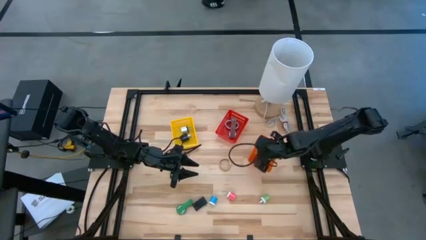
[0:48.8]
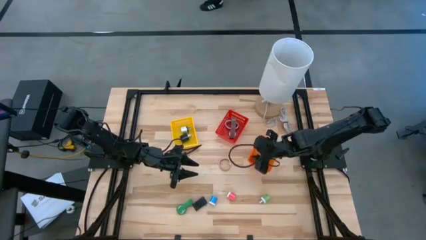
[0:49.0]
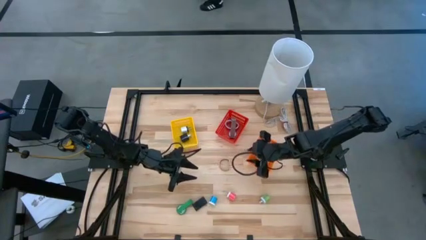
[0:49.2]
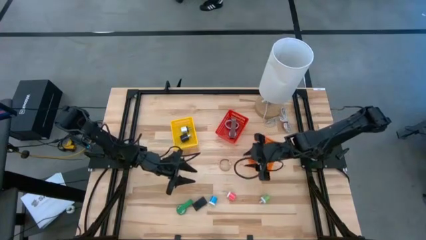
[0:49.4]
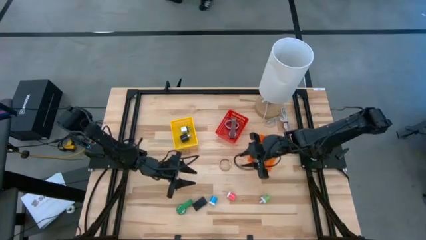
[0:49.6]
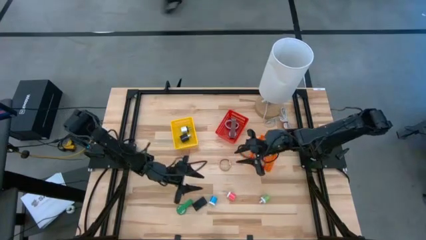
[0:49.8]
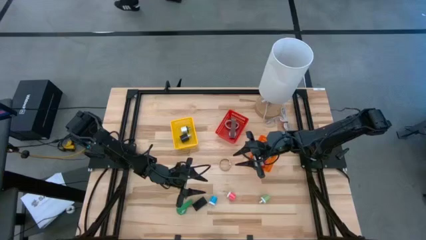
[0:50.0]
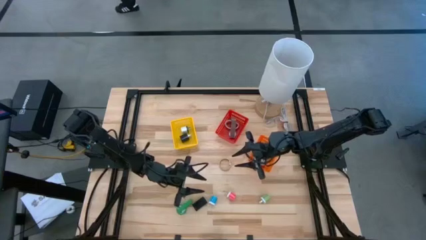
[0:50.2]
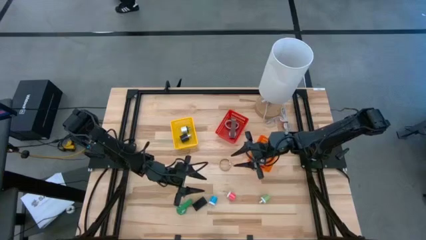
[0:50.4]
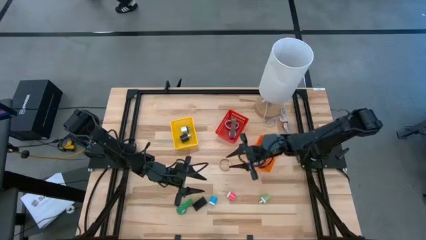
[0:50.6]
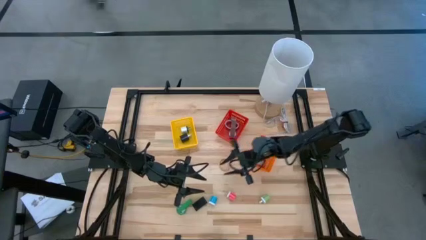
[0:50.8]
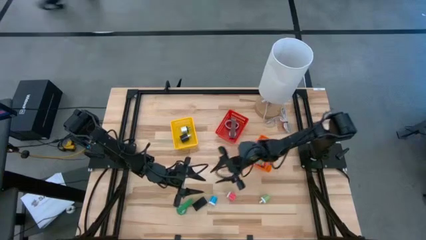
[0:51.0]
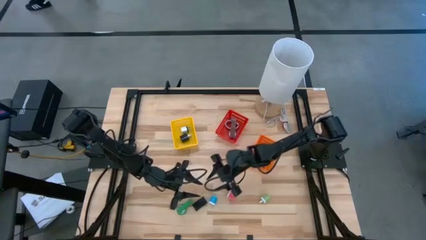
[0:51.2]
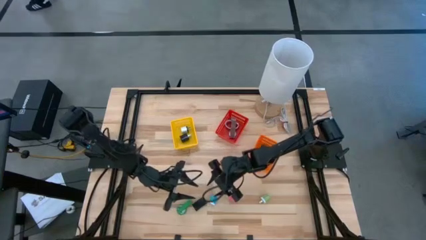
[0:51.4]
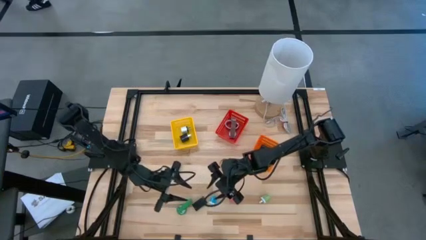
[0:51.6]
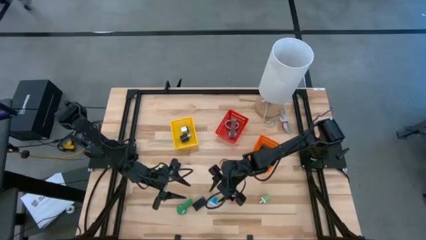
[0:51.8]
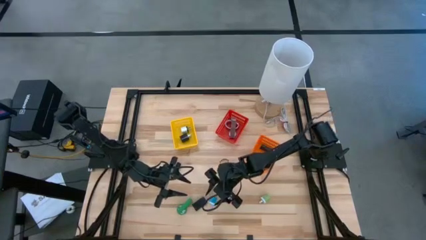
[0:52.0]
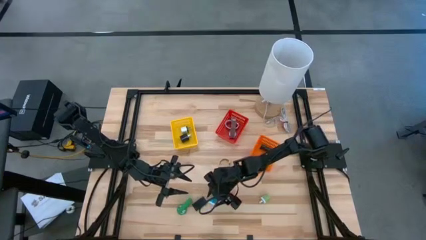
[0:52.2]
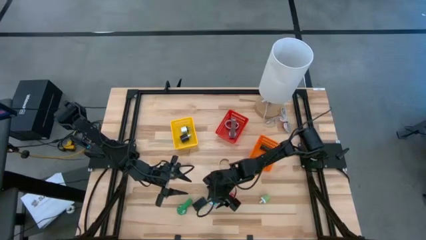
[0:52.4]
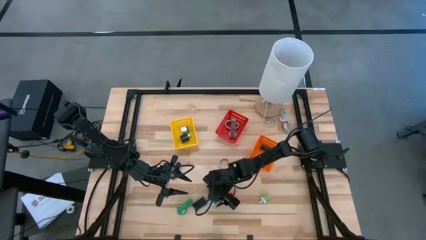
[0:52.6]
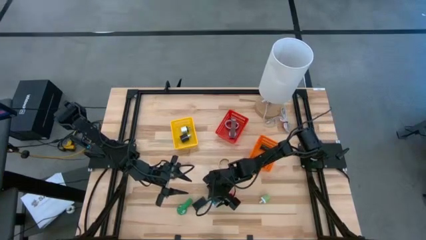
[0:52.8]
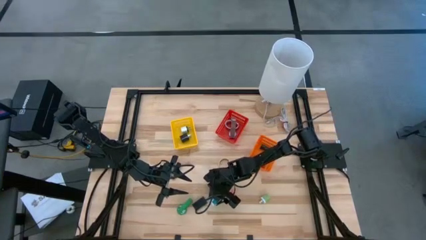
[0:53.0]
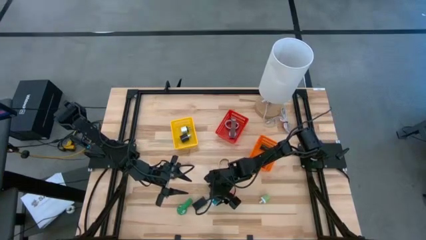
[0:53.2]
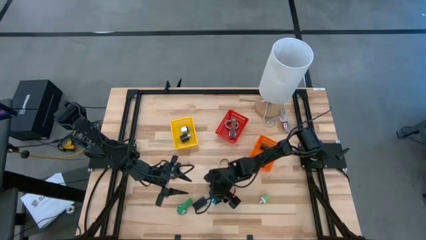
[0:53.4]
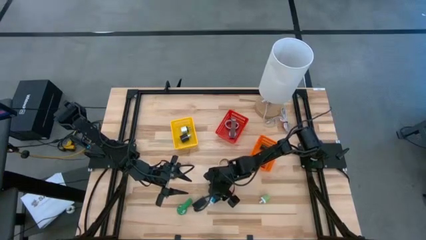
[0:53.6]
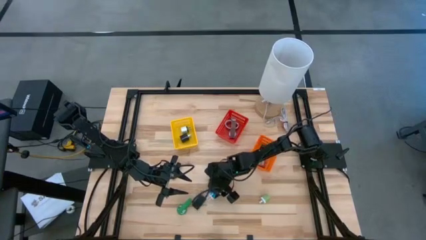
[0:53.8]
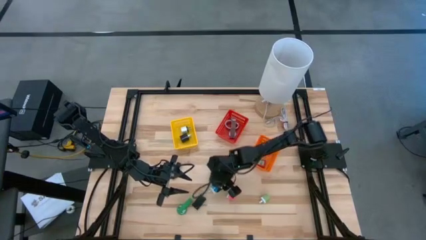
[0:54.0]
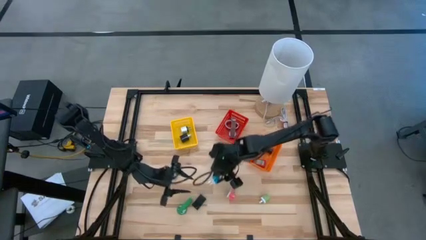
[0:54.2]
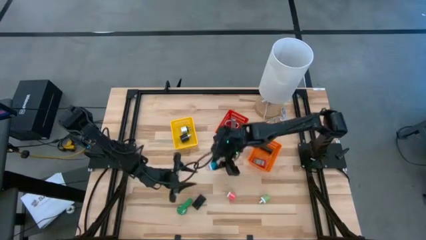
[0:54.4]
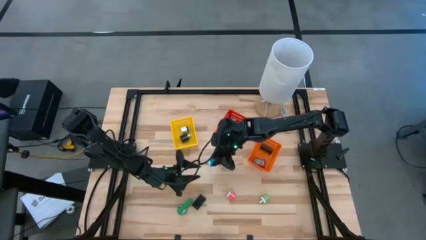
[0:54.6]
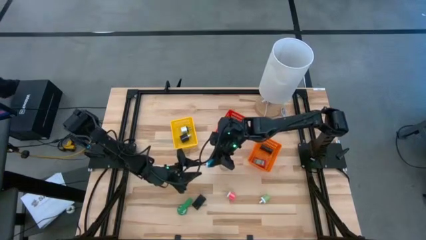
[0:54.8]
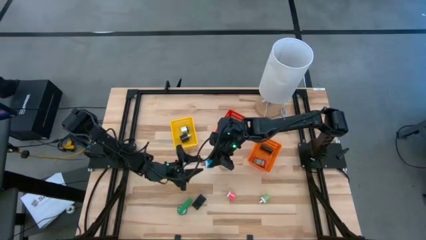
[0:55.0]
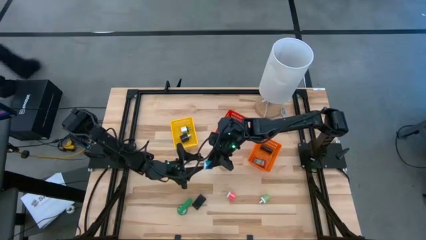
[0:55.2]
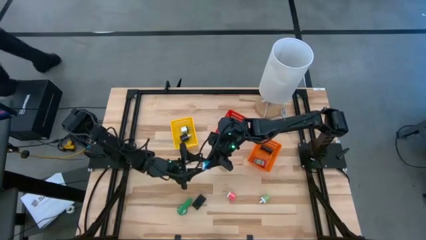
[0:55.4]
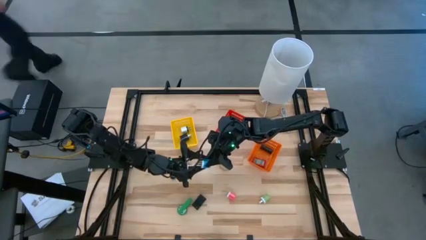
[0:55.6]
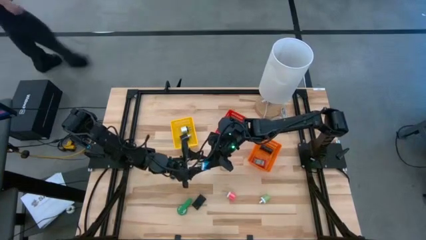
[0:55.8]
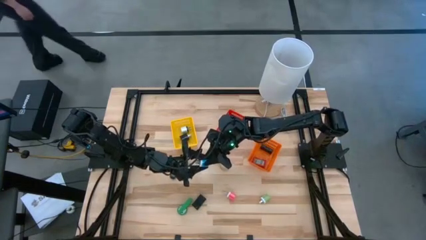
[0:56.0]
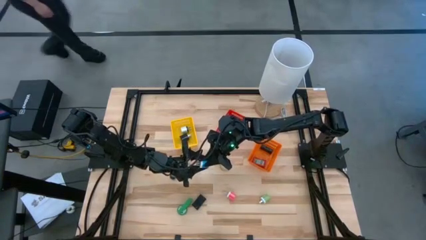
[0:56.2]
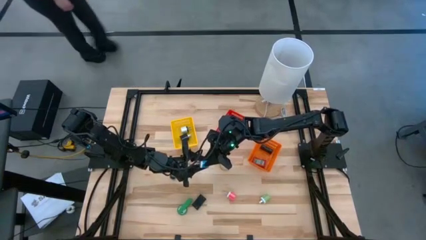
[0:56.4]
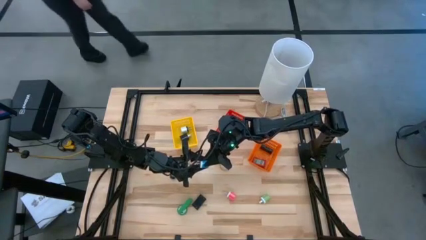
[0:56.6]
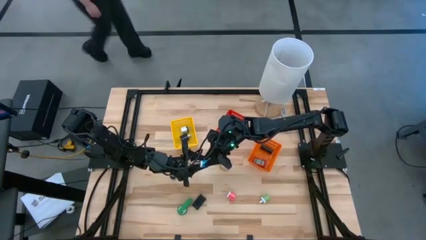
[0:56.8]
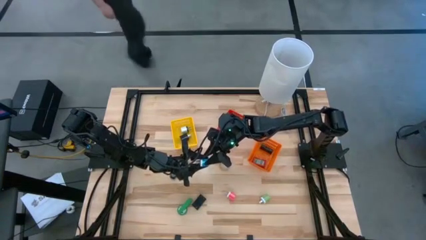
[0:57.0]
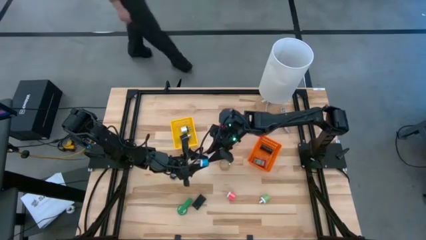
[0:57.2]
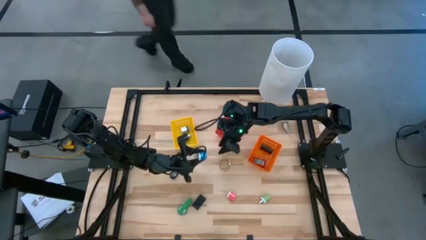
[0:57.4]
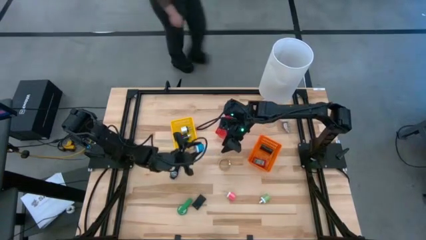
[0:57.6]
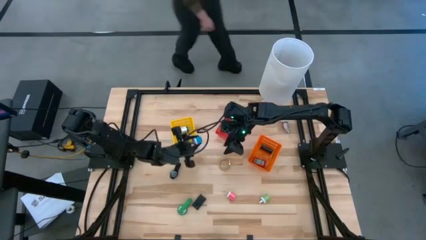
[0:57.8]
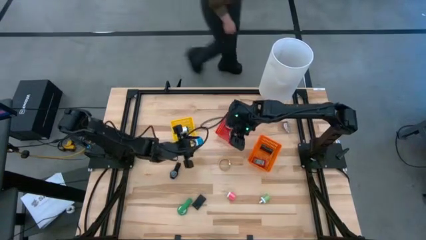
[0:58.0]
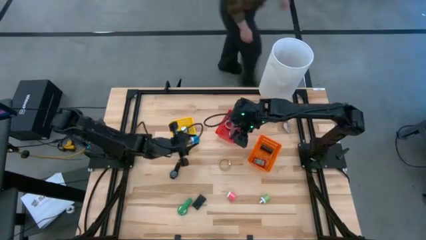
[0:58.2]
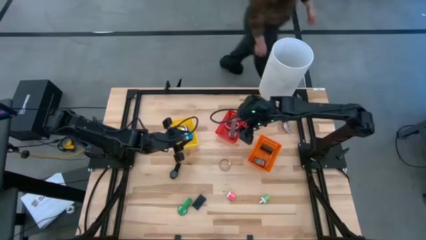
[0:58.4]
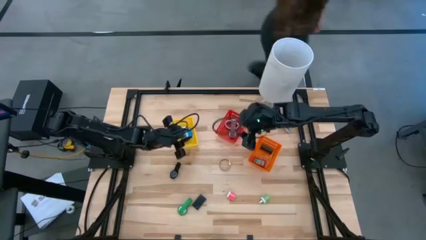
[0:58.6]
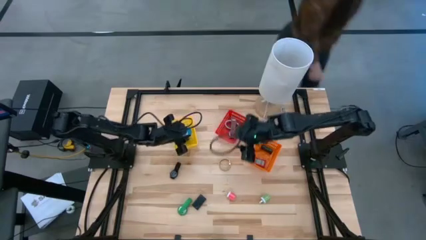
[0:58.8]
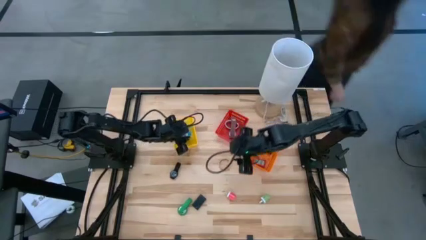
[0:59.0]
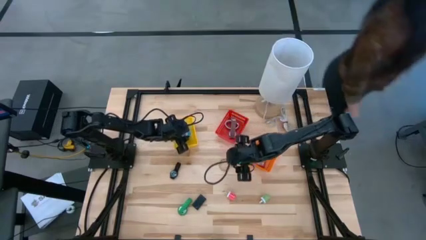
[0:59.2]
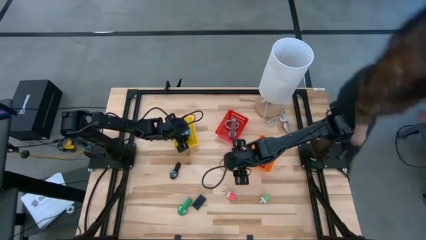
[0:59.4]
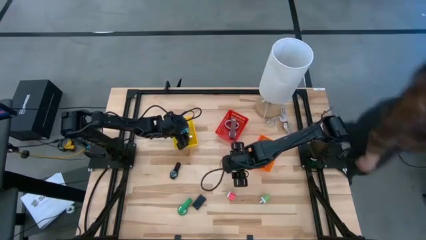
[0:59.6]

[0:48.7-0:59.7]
Task: Pick & Place Office items
Put the blue adapter into the yellow basket

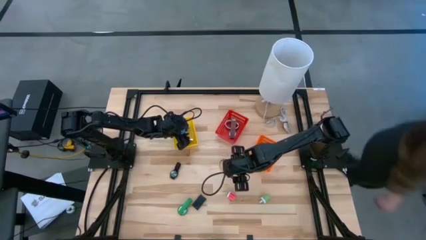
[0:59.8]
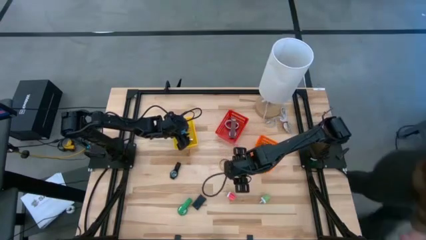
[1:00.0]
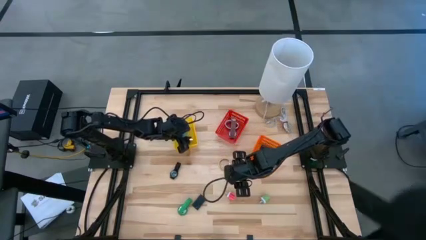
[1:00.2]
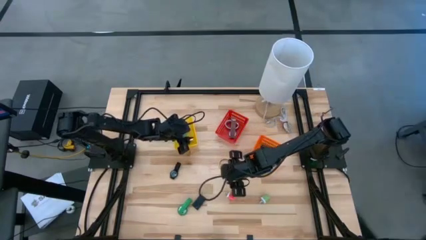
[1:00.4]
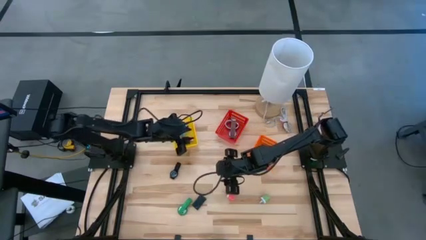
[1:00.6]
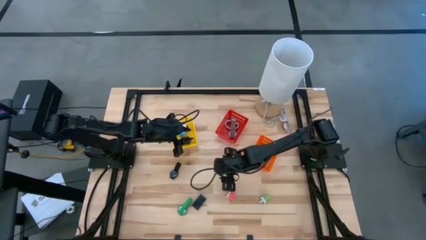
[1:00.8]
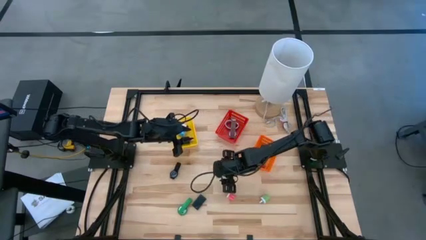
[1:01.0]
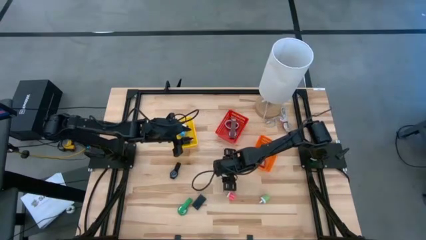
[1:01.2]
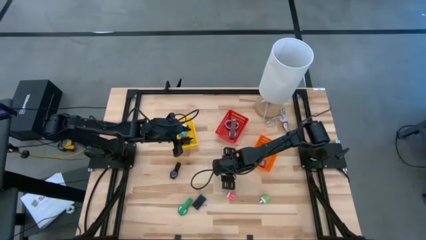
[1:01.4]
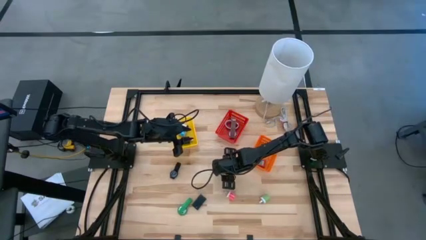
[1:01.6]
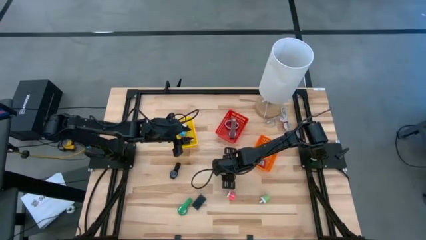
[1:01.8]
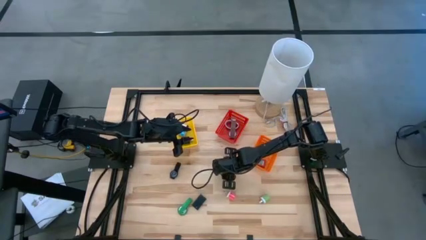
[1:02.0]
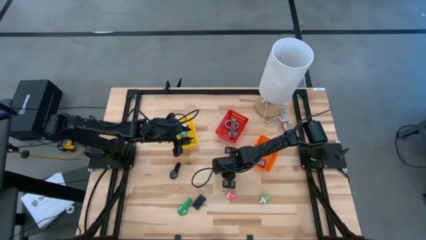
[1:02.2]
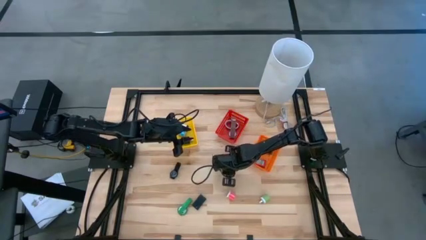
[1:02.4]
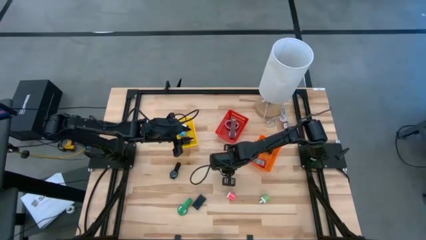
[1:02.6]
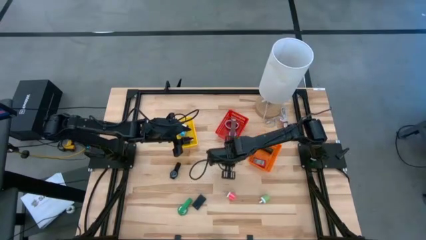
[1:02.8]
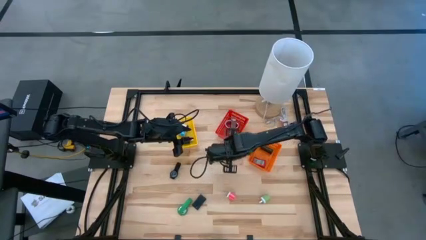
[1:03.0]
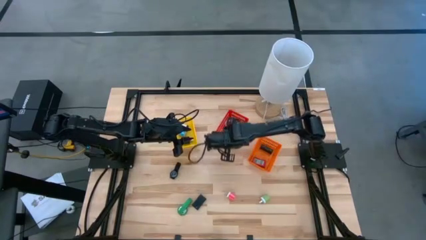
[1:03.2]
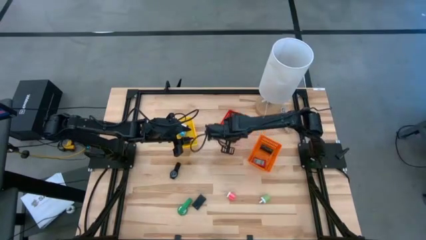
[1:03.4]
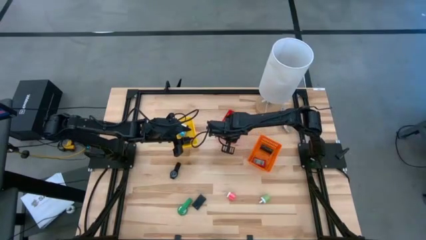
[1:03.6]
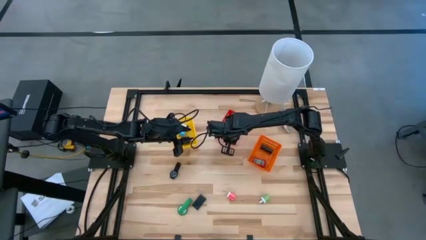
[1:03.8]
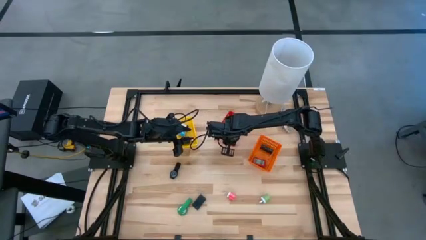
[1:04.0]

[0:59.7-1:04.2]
Put the gold watch into the red basket
